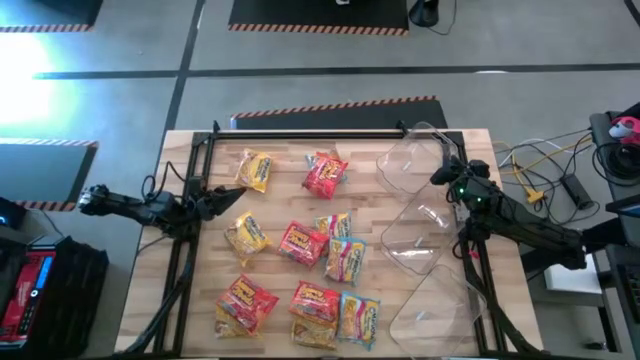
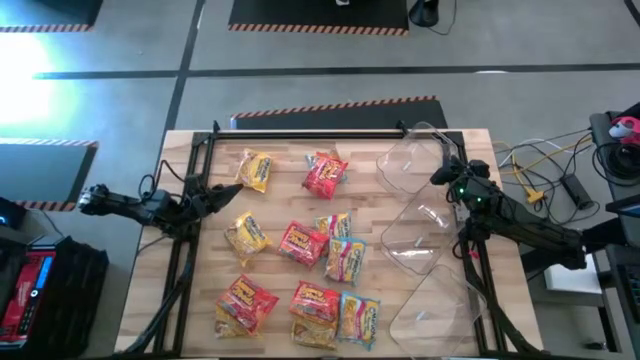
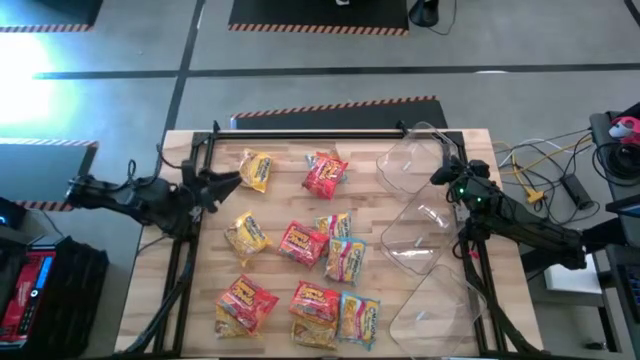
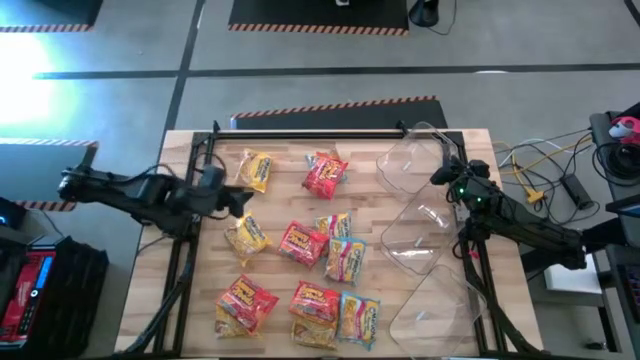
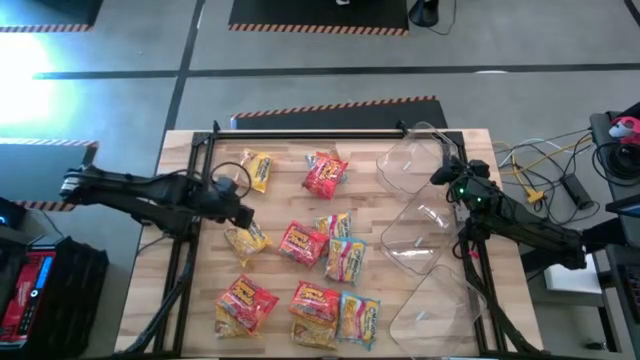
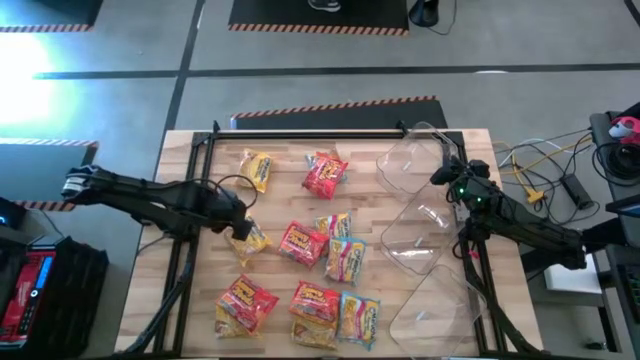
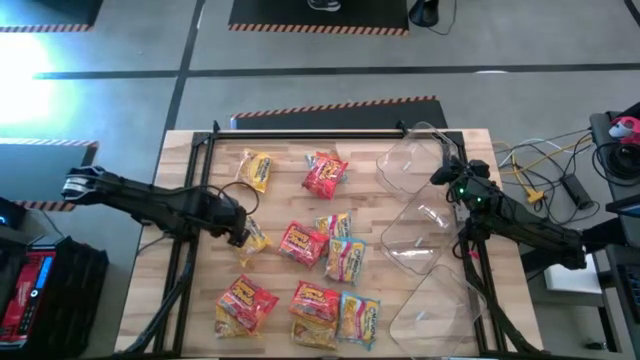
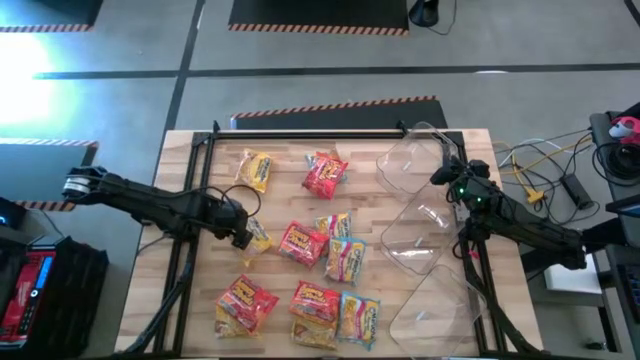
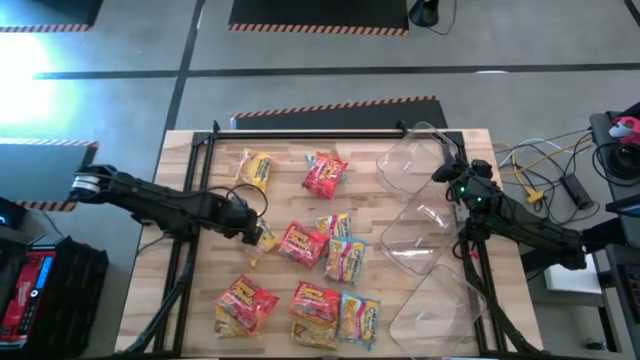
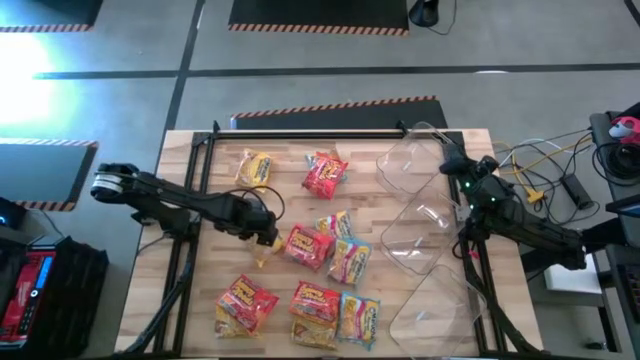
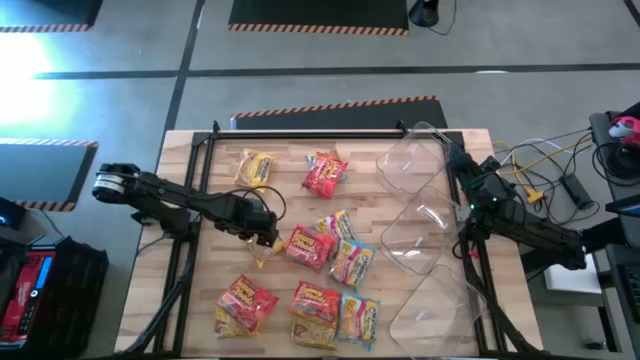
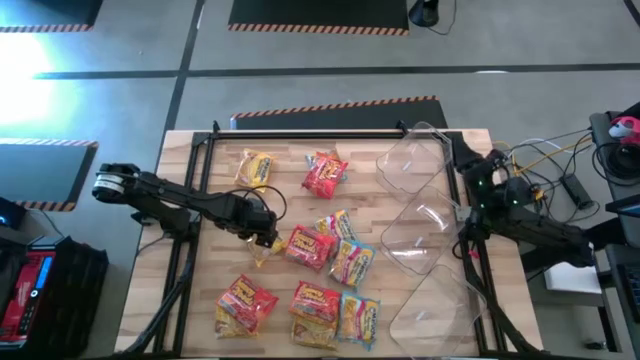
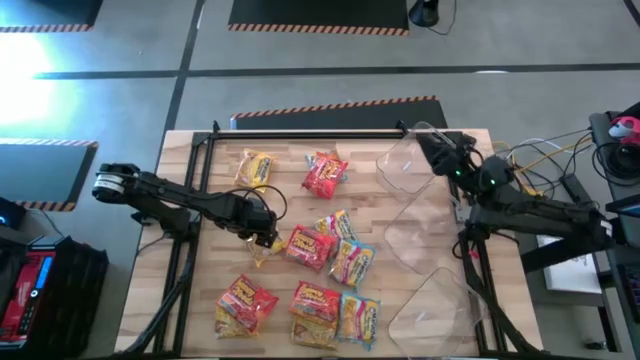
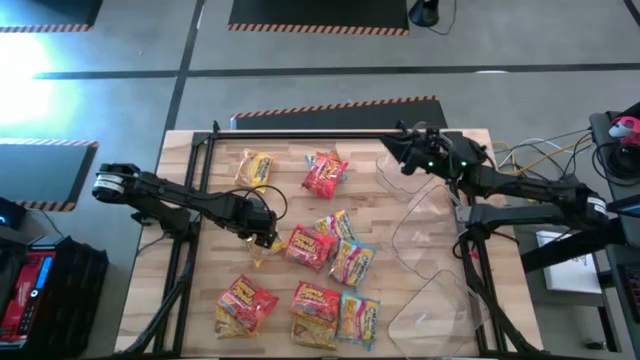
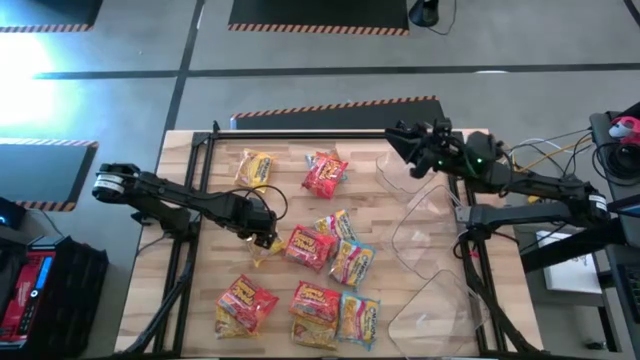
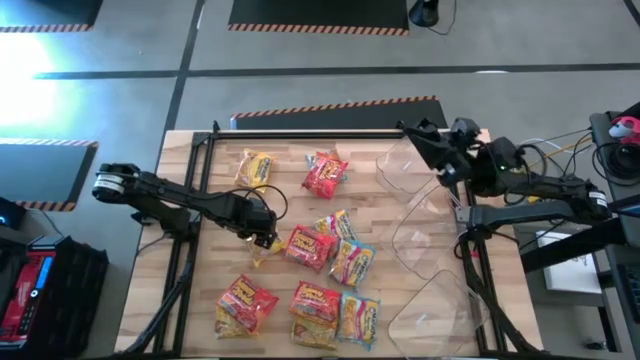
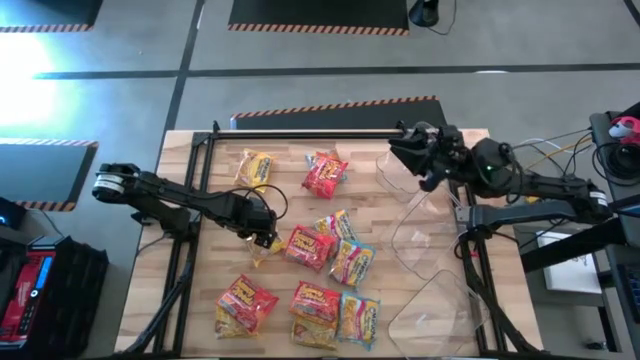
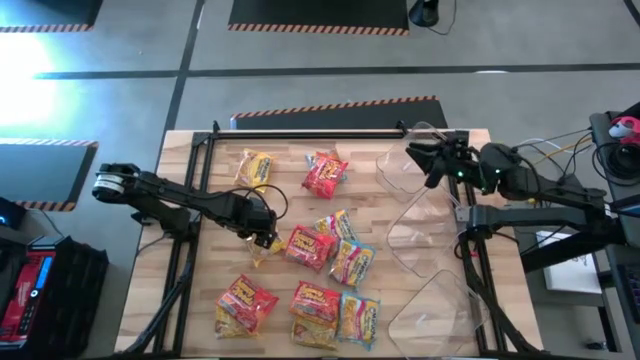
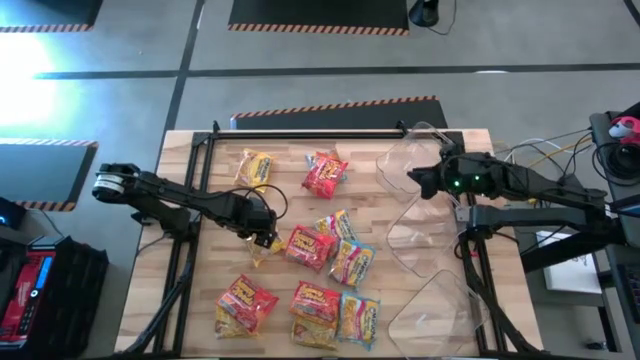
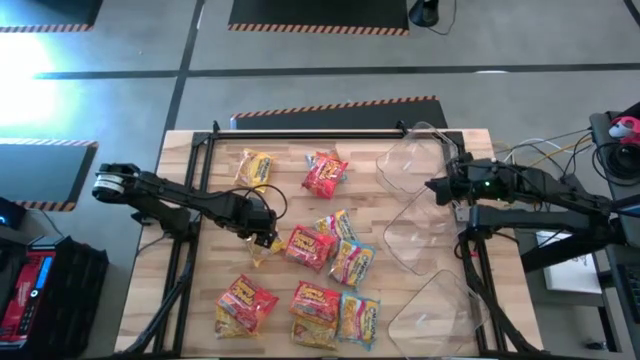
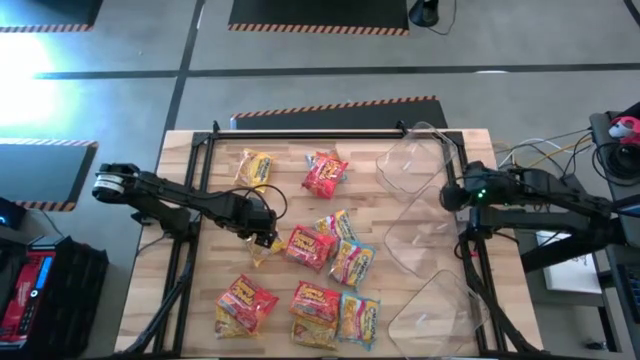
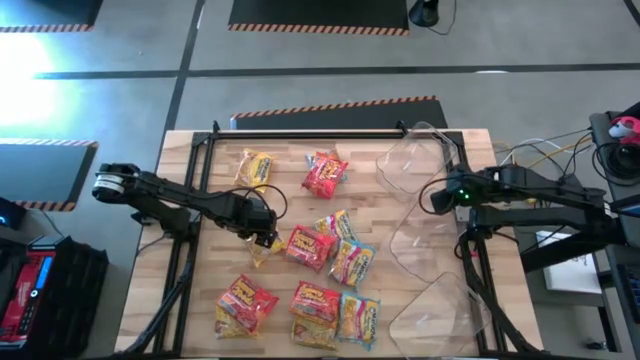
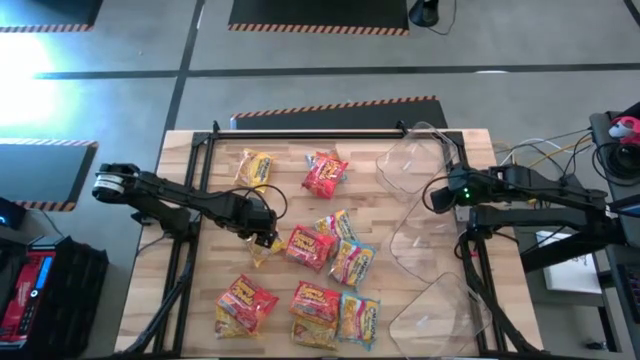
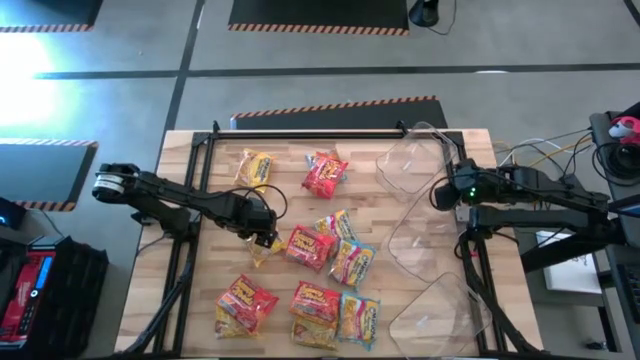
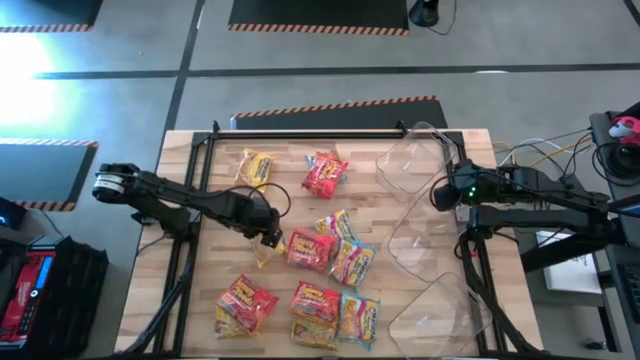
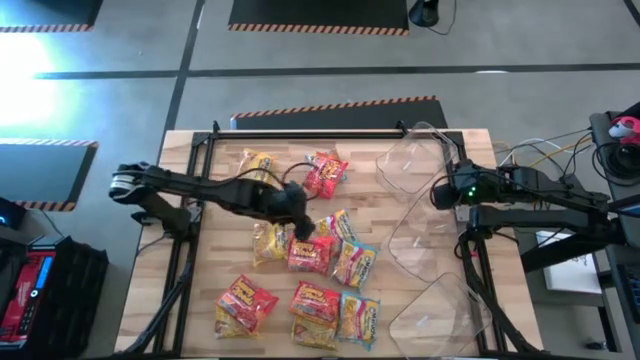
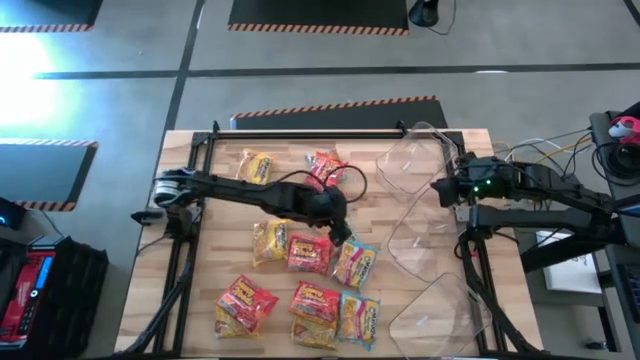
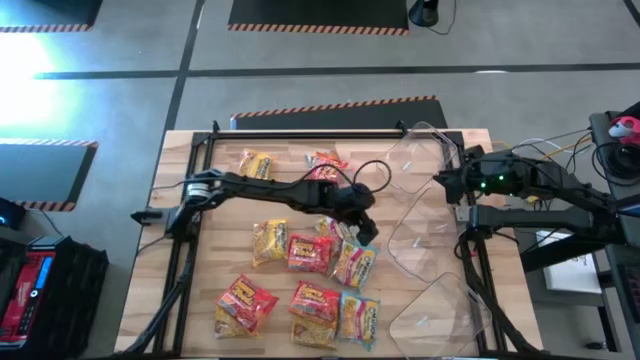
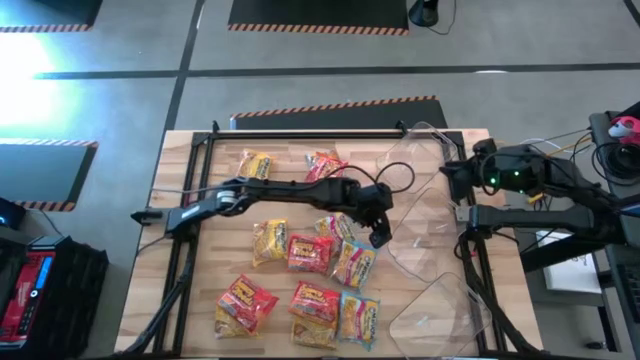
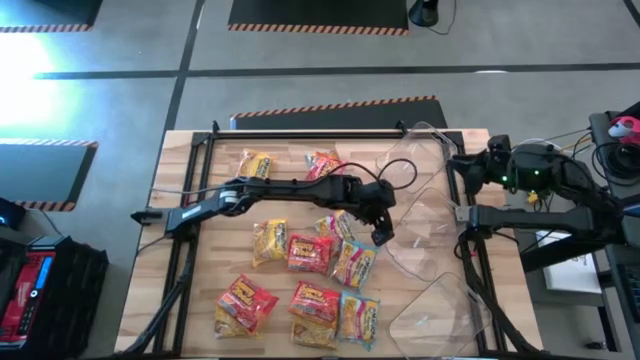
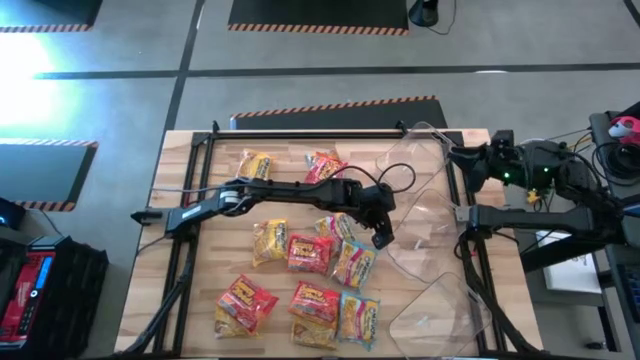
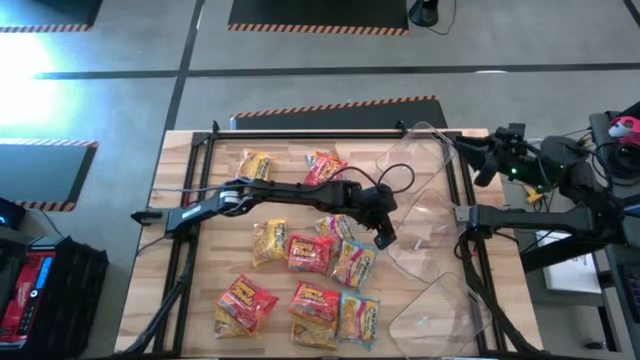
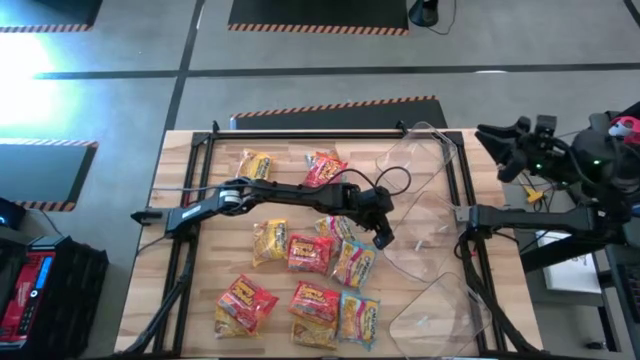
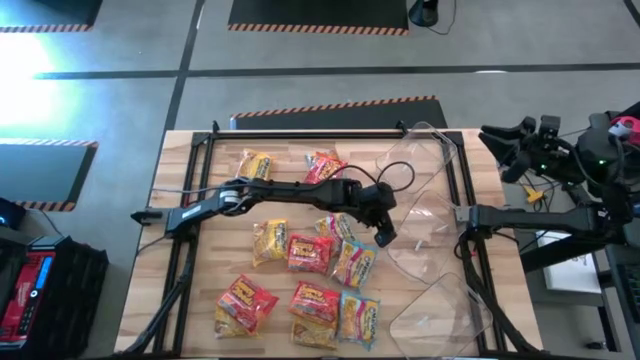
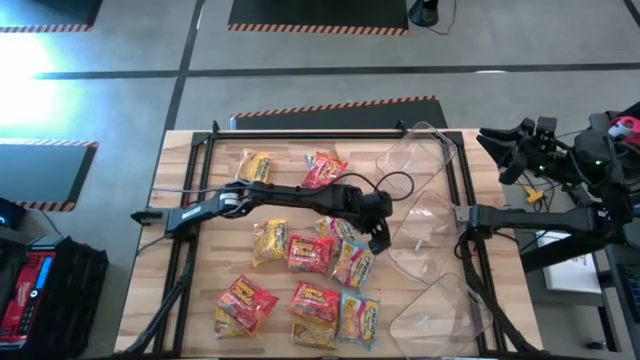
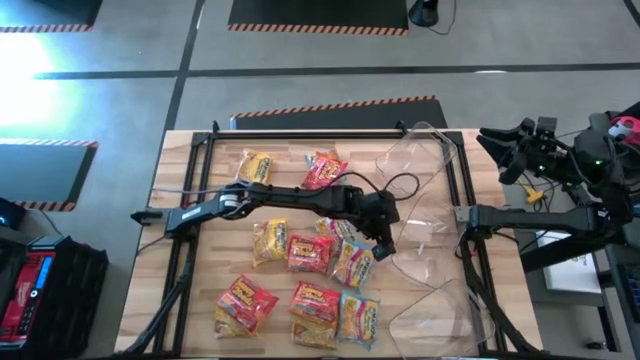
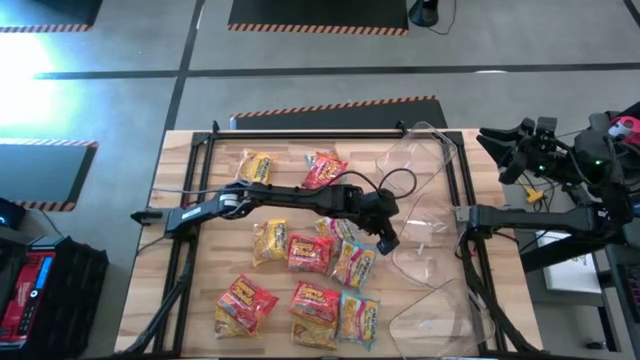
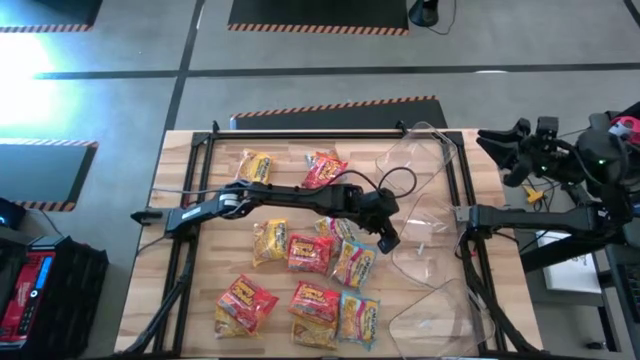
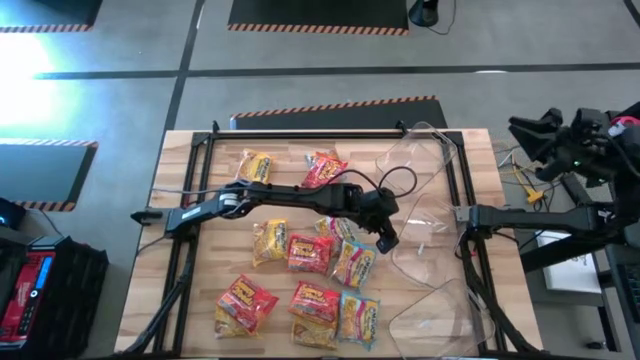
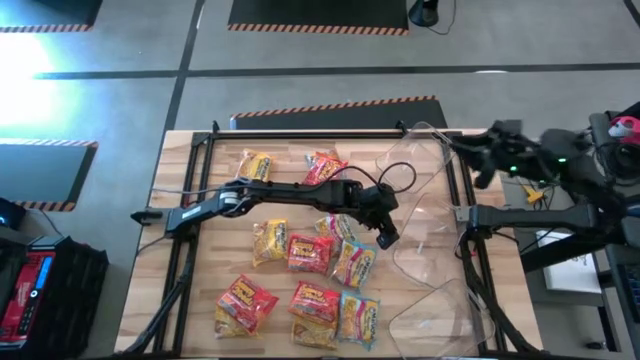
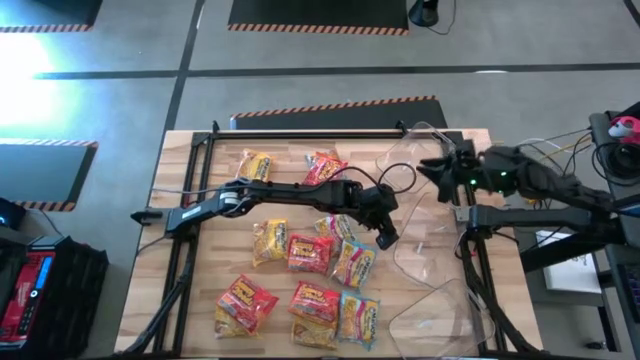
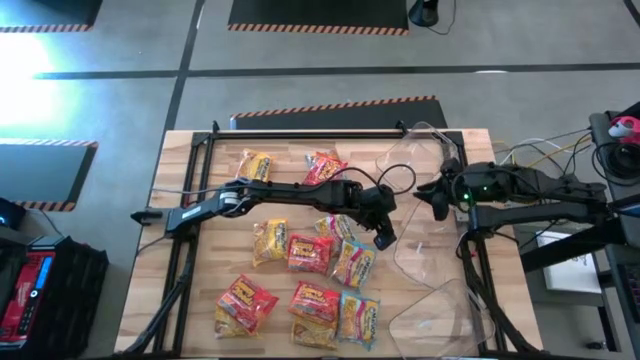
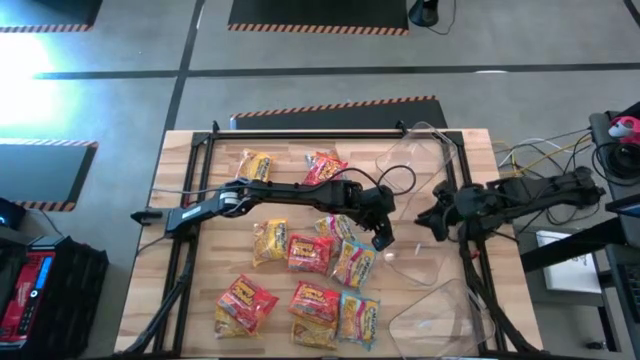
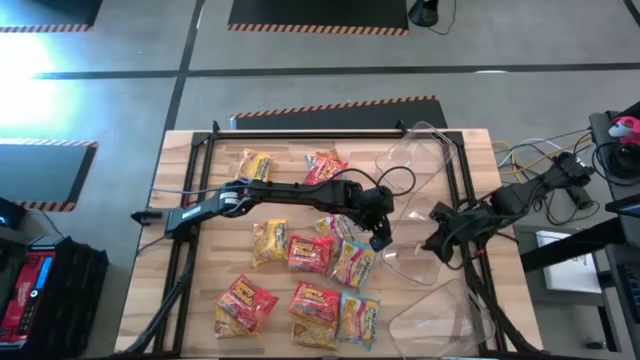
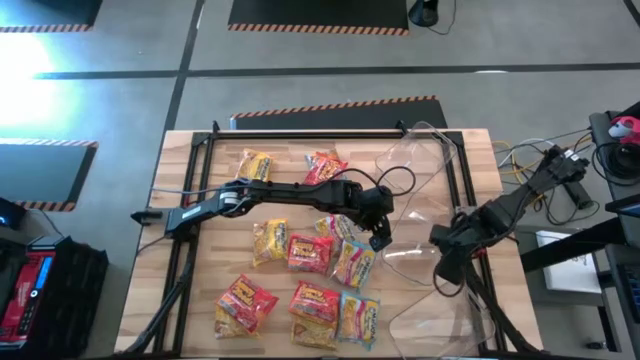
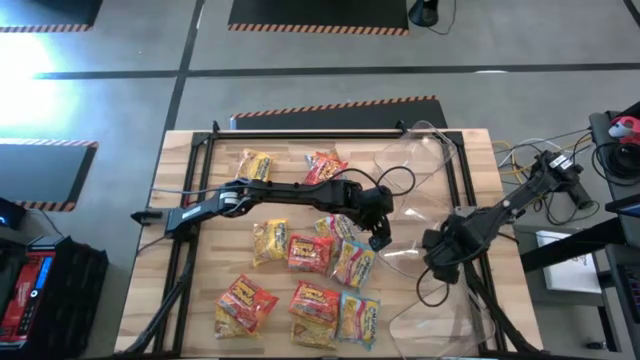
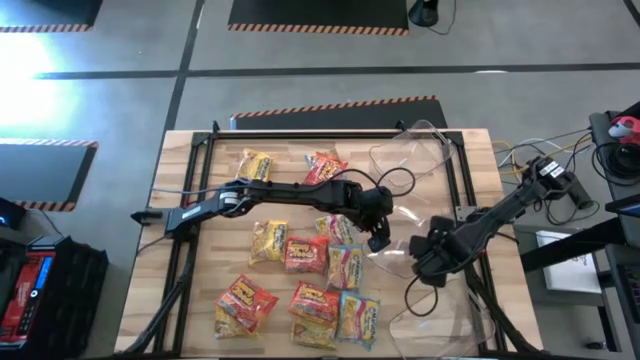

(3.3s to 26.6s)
Task: Sort Maruchan noodles
Adjust the middle transparent bin
